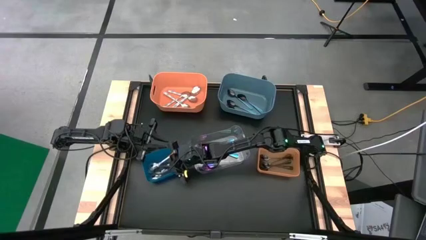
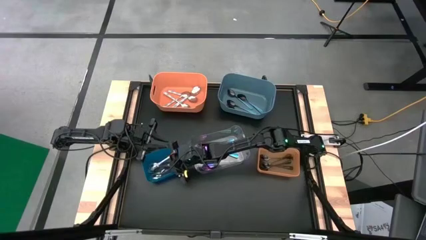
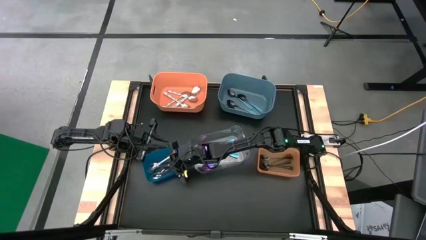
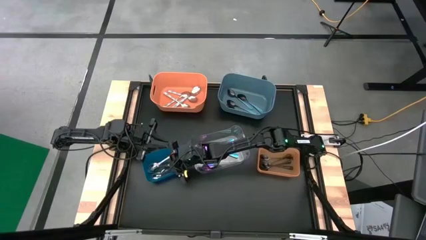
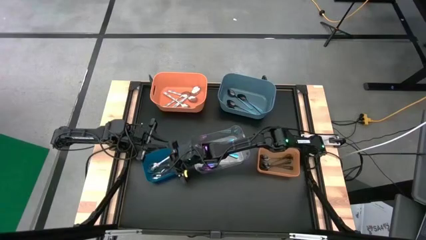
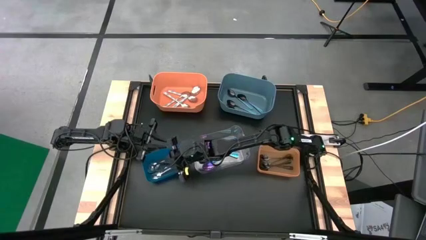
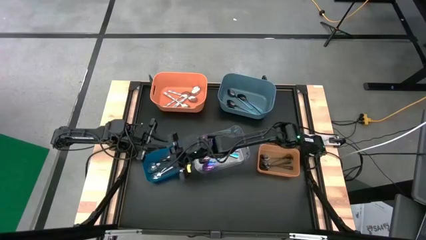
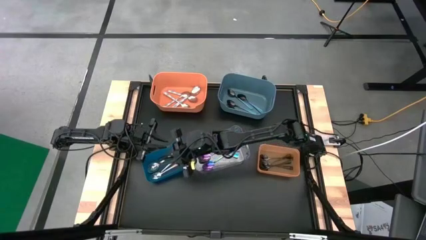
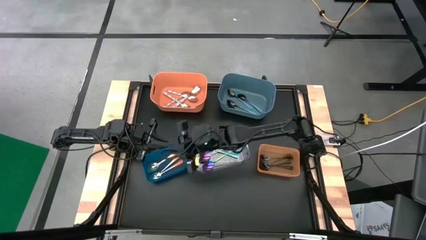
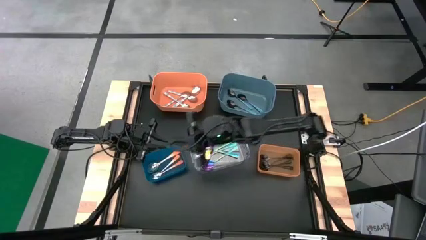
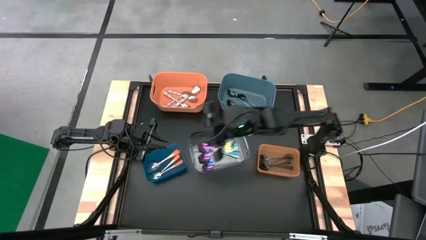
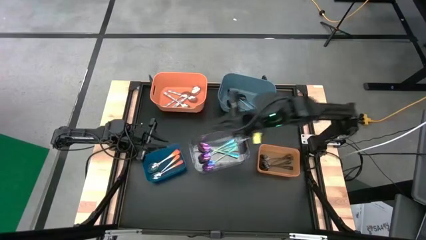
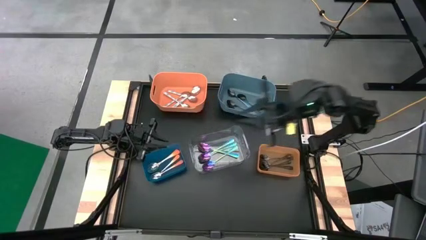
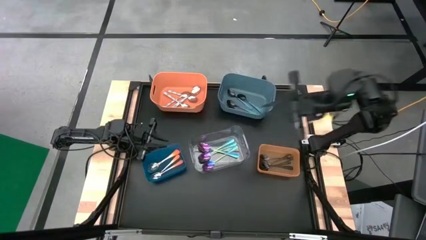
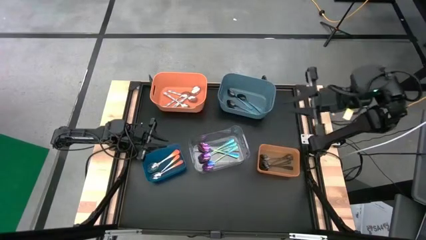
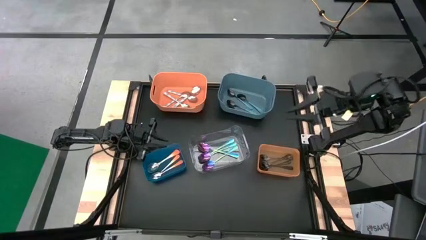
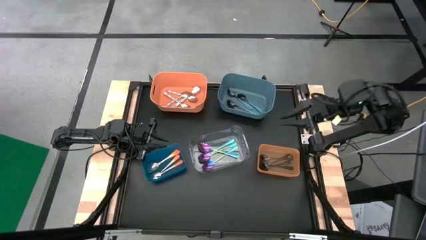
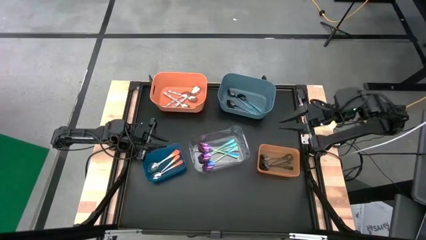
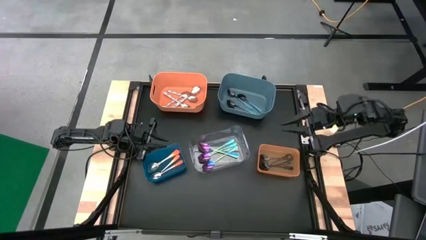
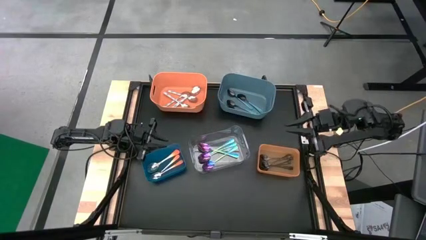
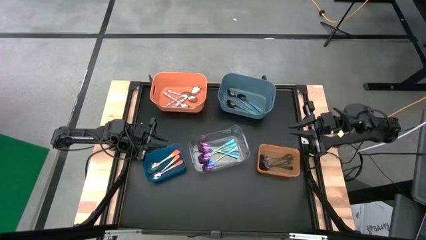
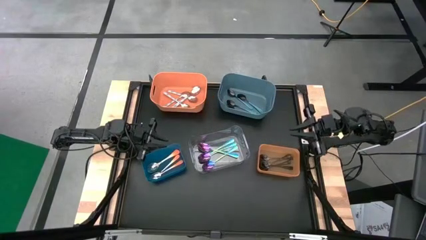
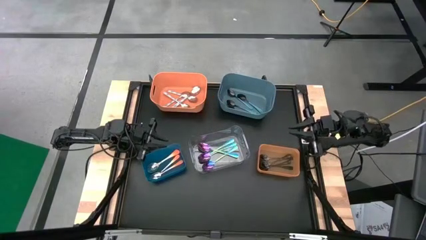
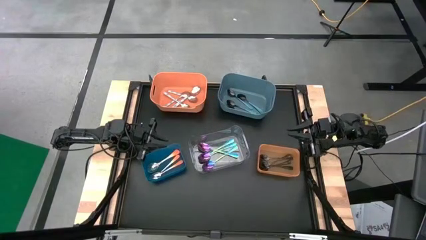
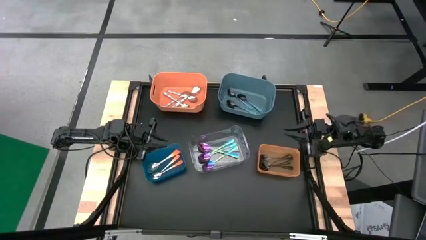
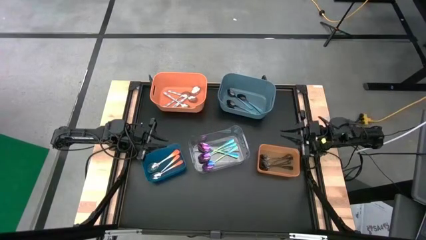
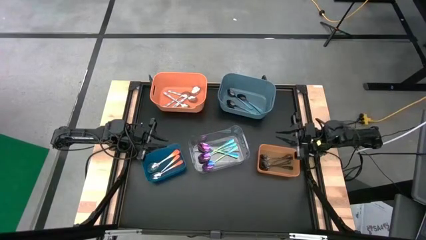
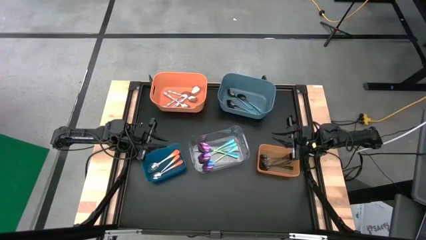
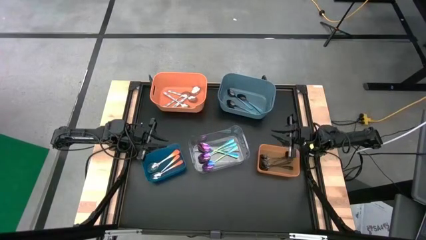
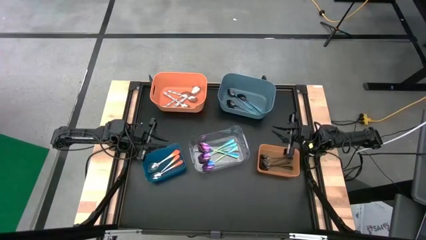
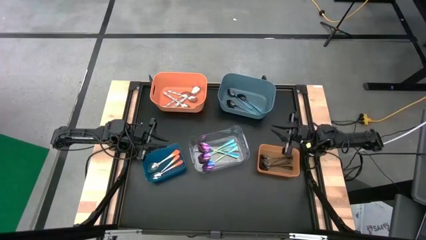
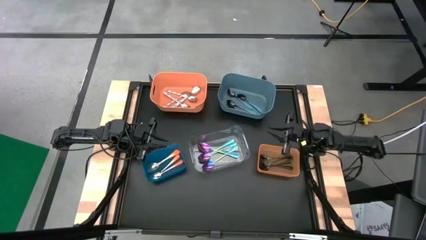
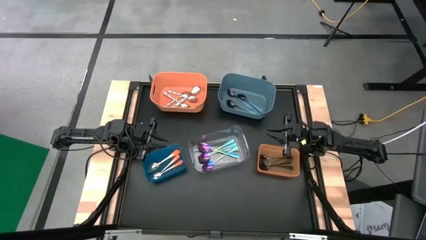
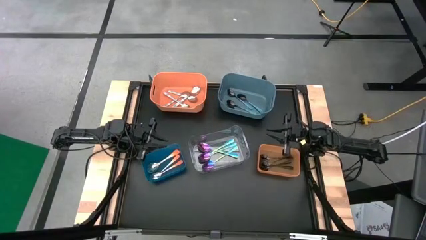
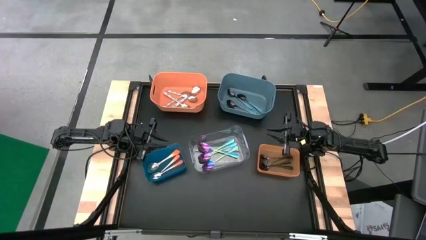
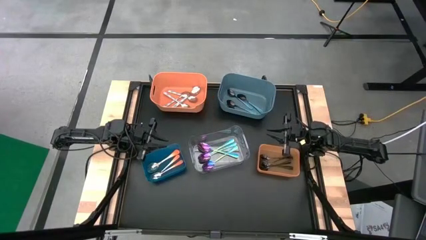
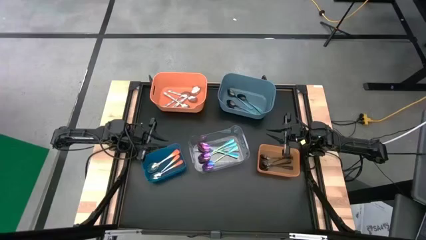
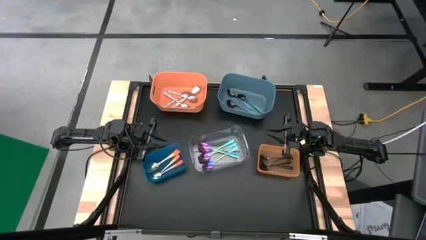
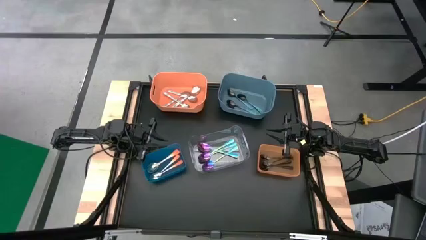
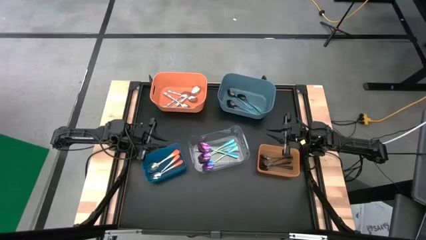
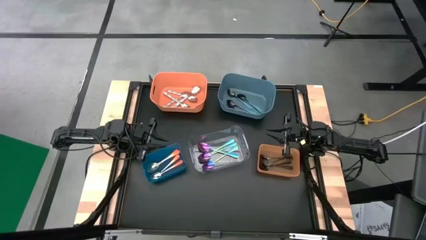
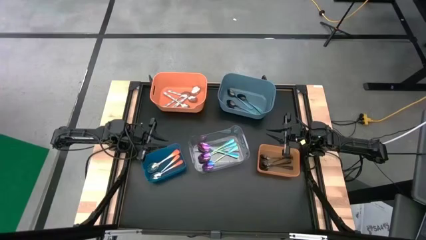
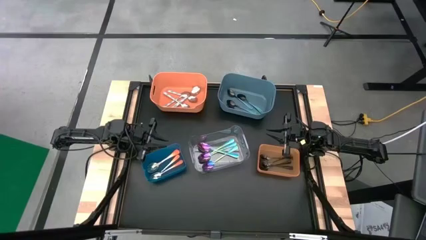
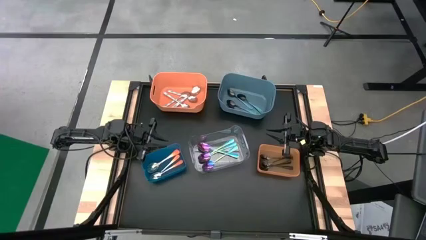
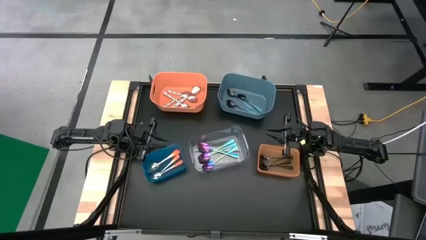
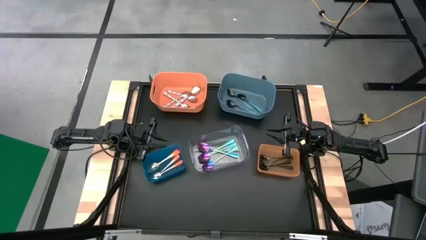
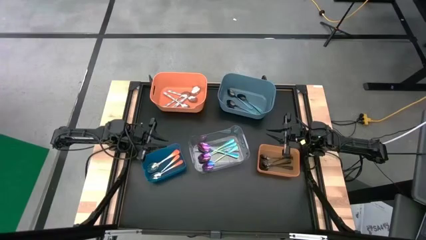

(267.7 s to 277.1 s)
Task: Sort silverware by color (type)
Return to Home Position

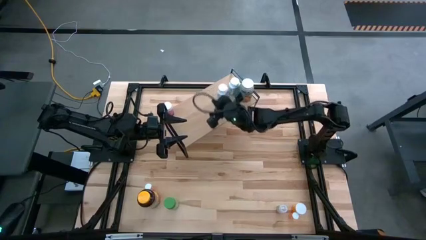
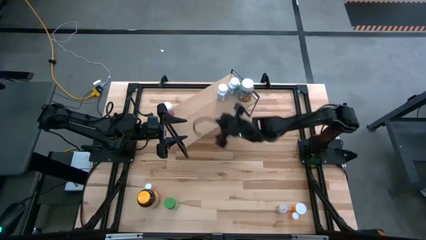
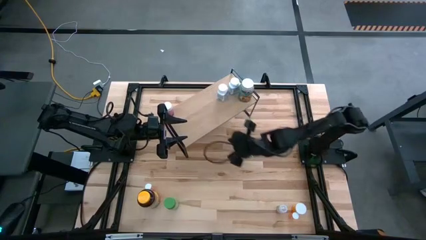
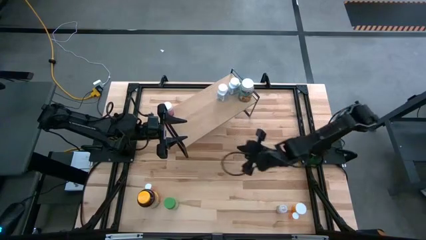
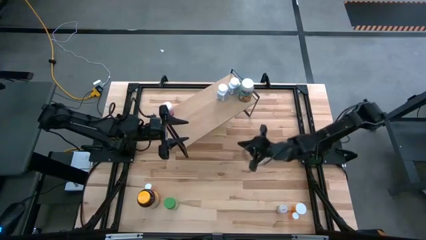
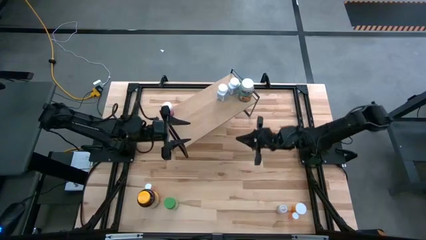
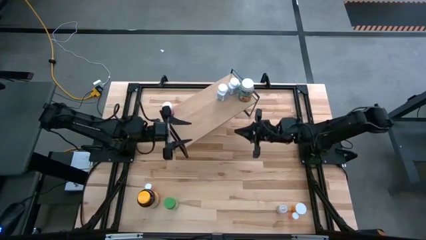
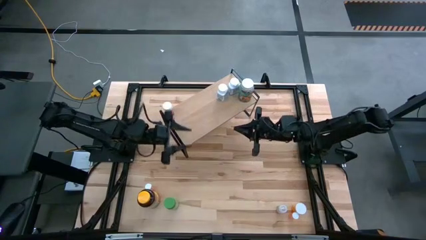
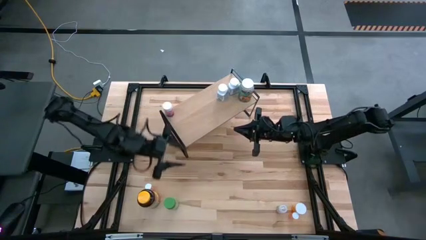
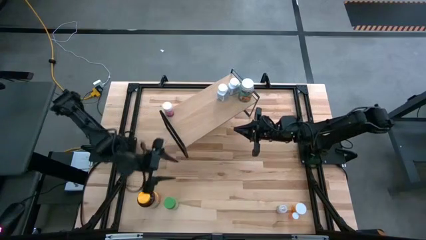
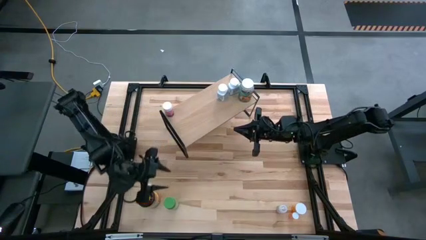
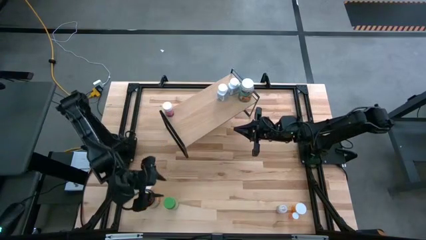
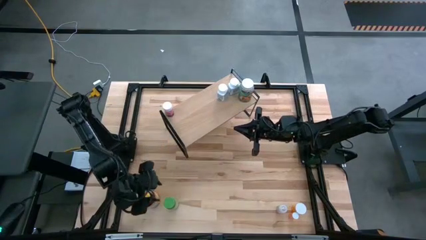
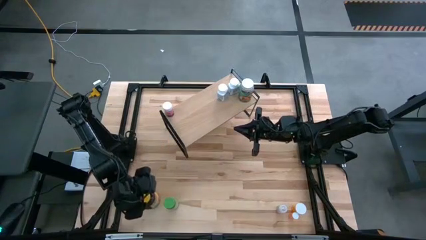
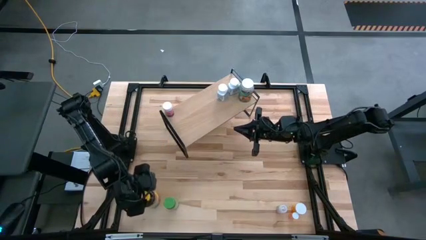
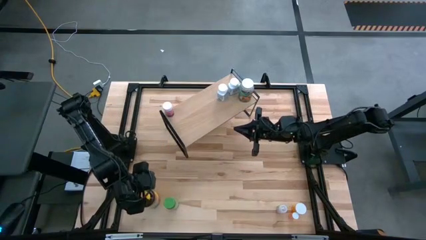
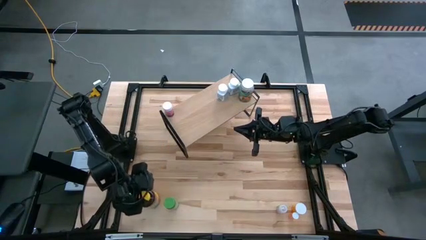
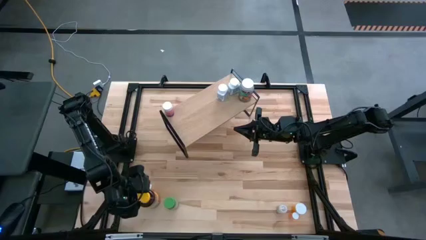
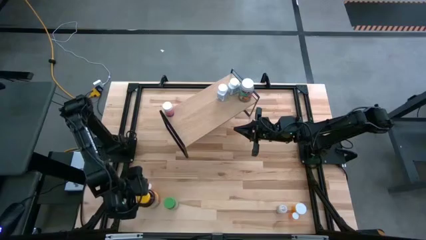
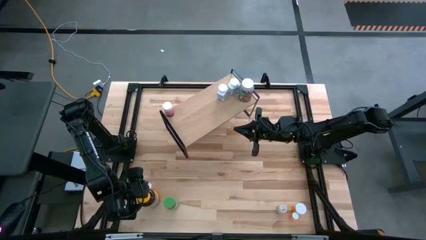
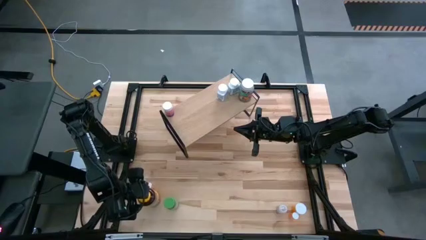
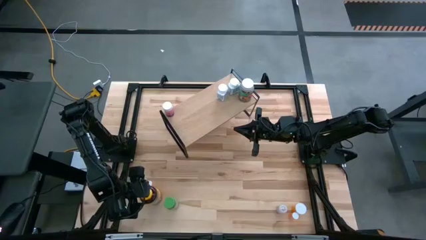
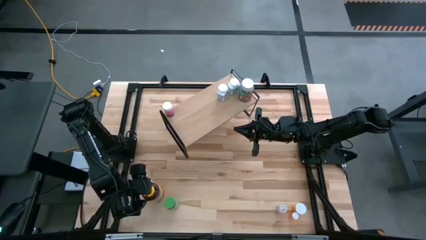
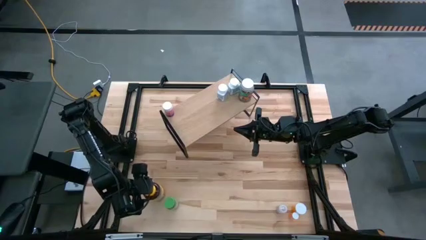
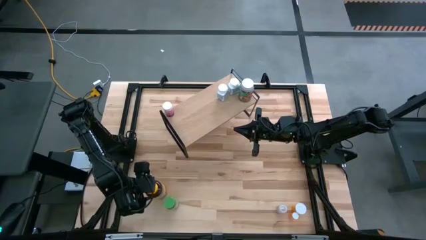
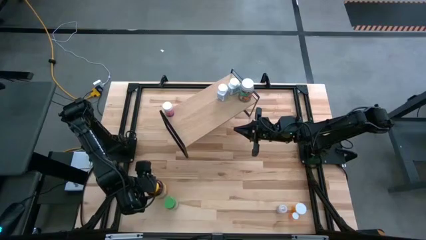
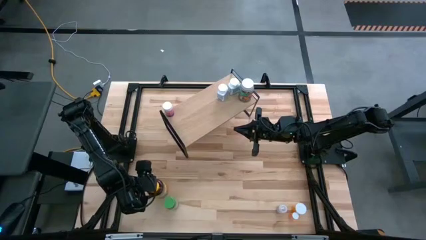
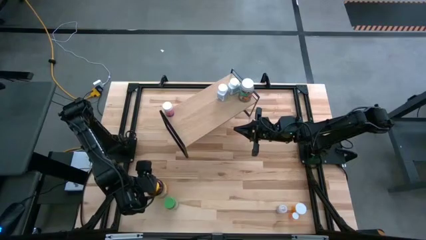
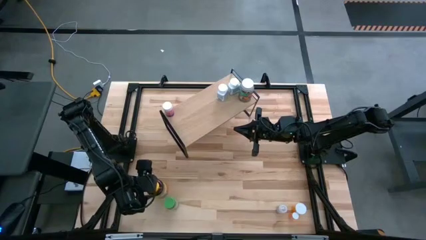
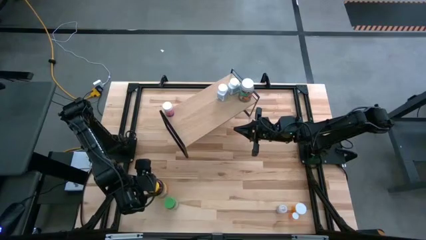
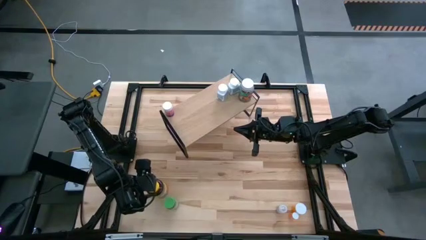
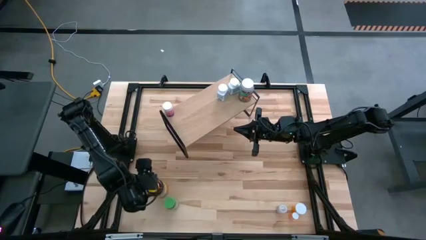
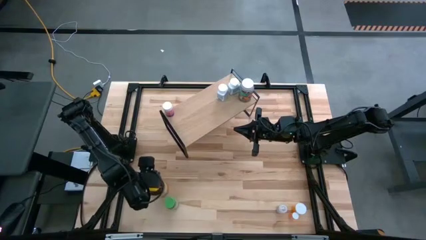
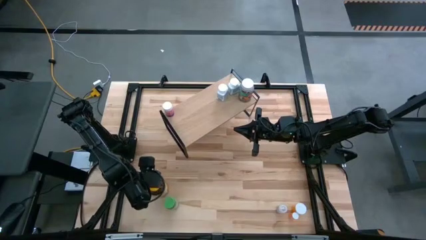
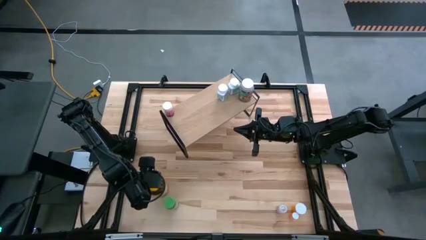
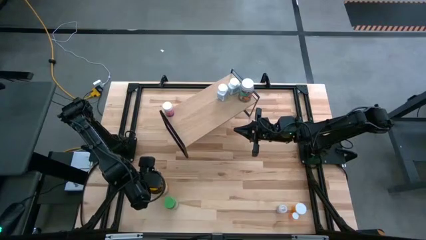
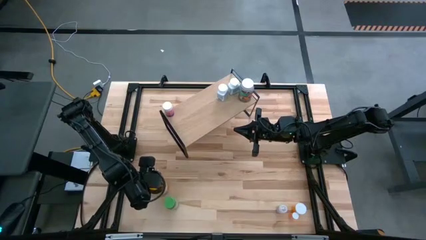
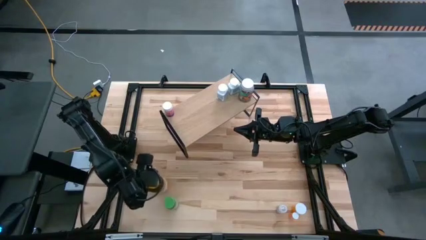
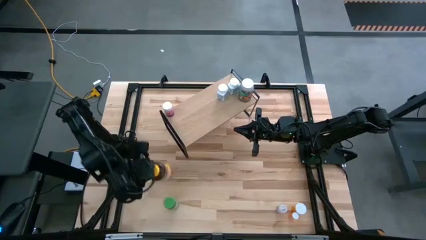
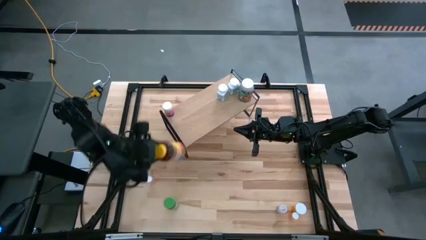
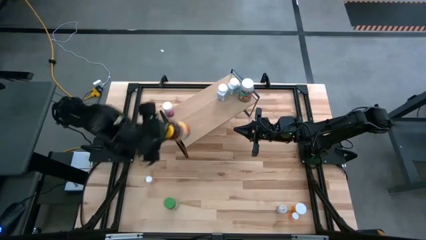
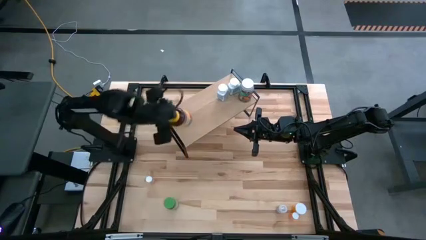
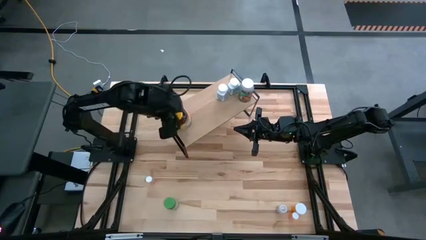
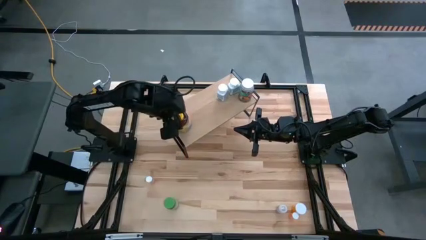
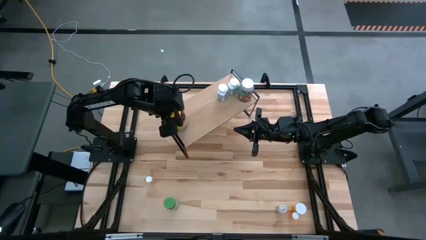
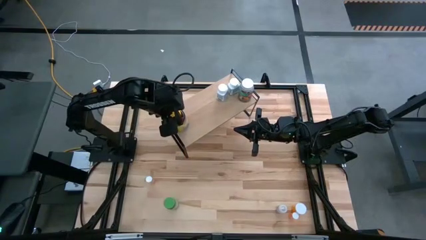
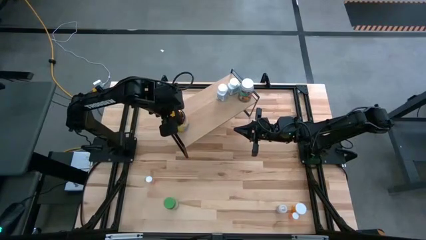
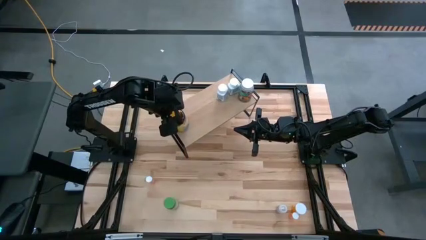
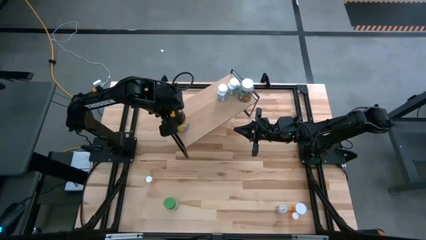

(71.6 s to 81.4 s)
Task: Pick and place medicine bottles onto shelf by color
Put the yellow medicine bottle on the shelf
